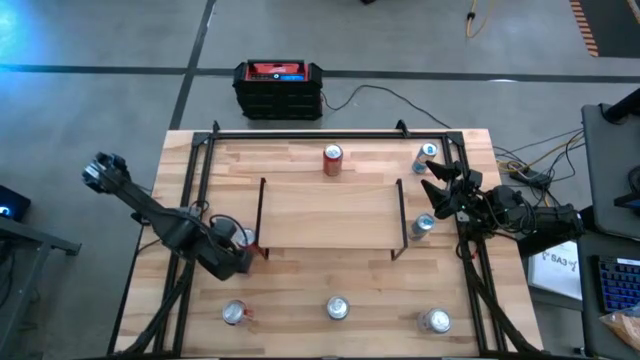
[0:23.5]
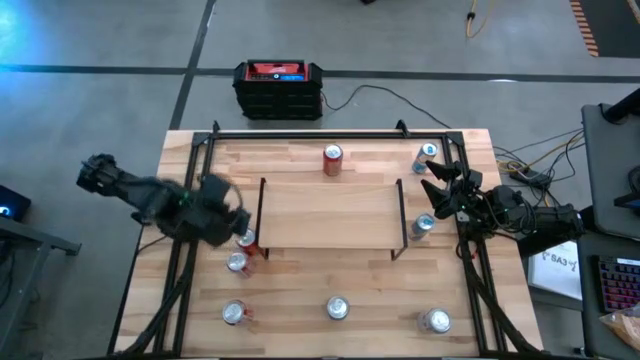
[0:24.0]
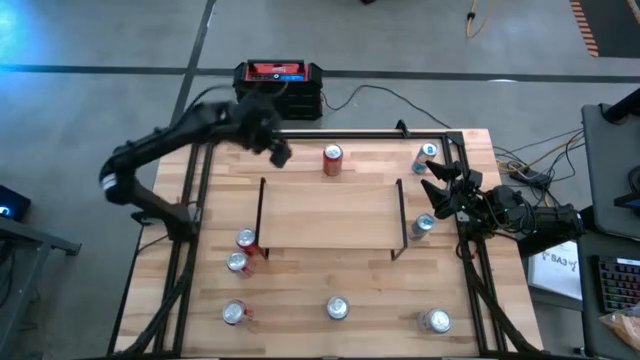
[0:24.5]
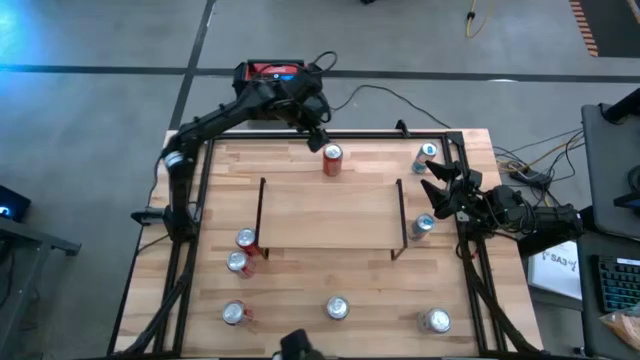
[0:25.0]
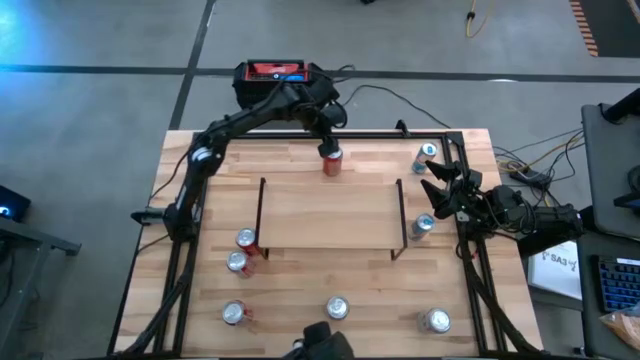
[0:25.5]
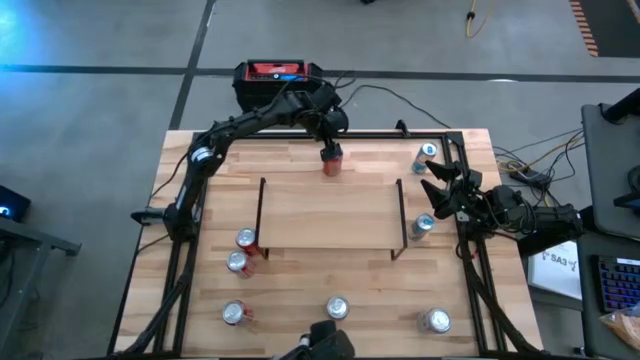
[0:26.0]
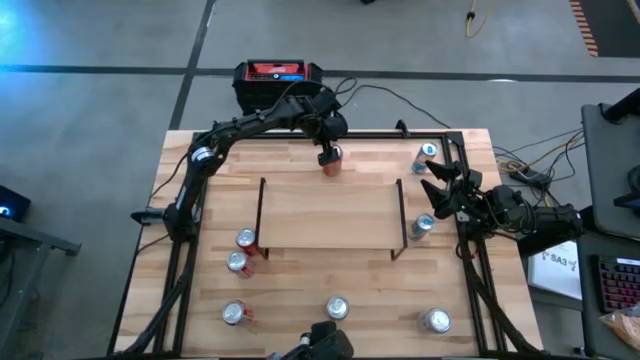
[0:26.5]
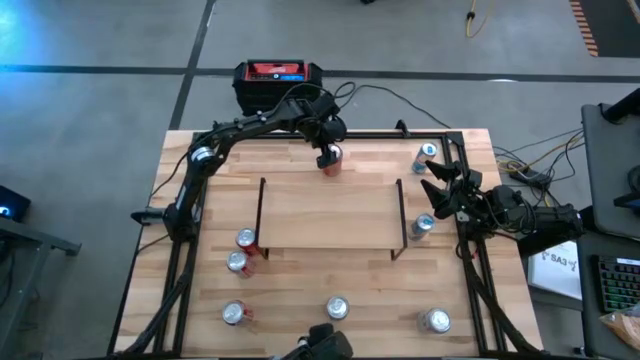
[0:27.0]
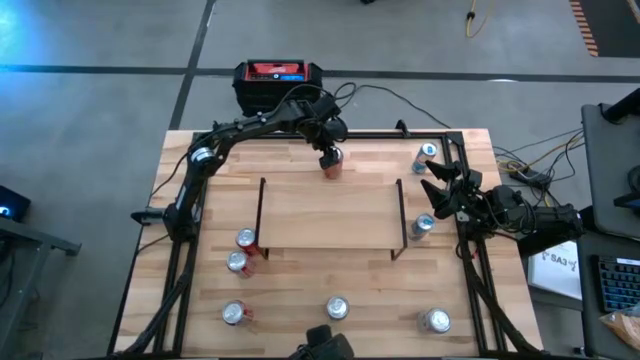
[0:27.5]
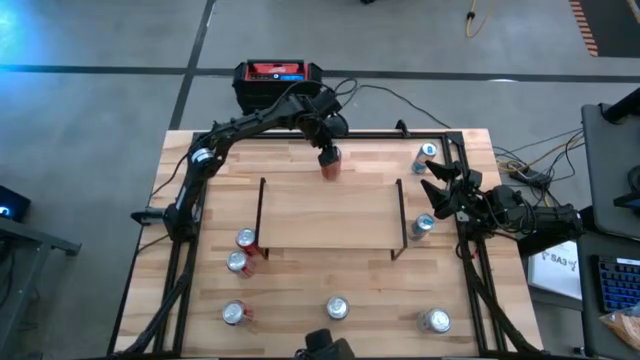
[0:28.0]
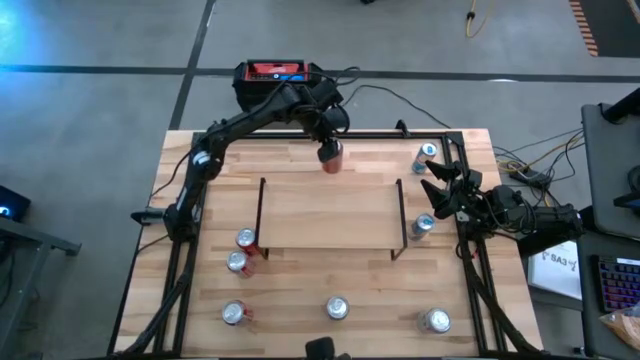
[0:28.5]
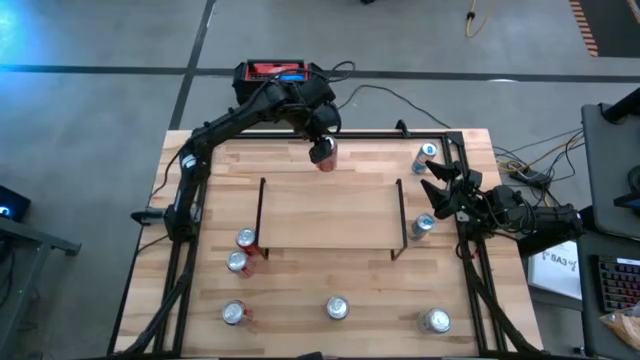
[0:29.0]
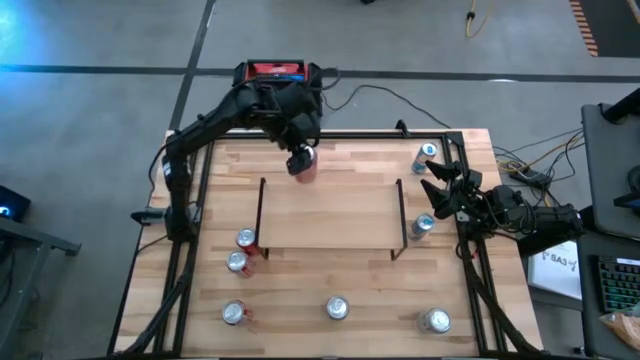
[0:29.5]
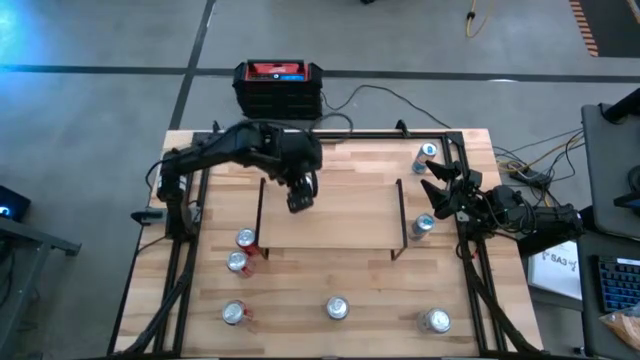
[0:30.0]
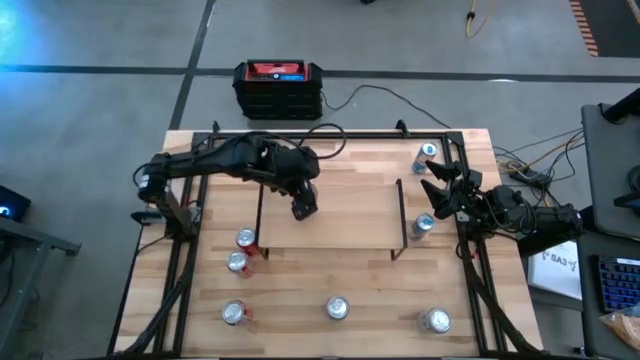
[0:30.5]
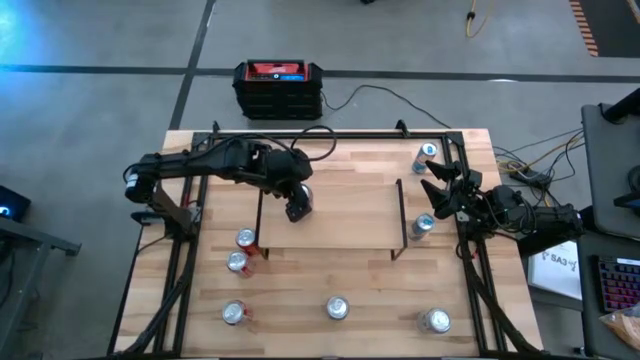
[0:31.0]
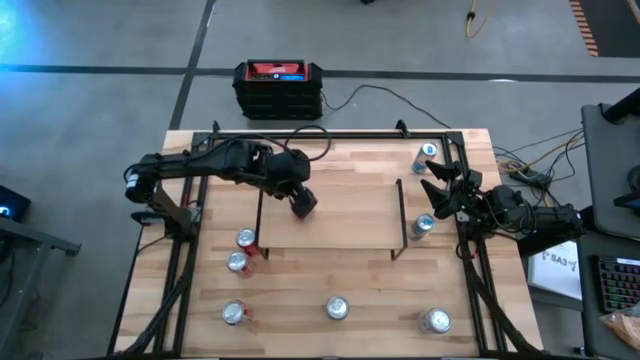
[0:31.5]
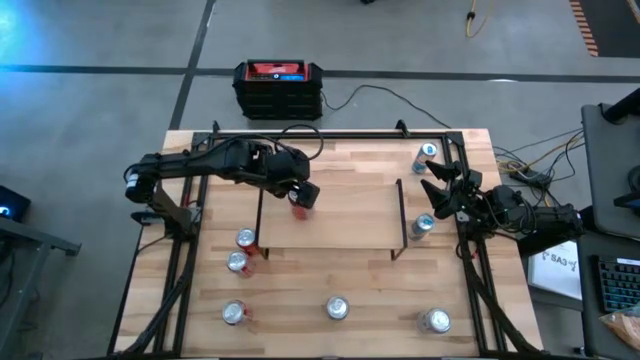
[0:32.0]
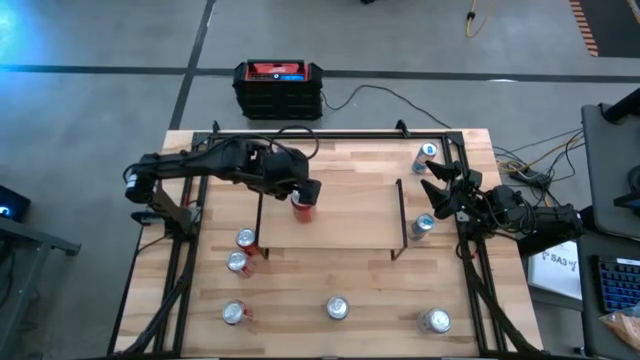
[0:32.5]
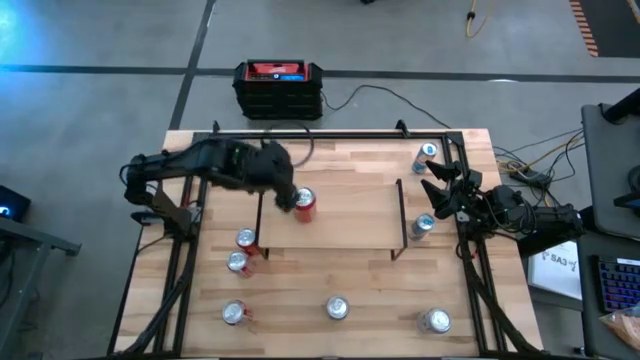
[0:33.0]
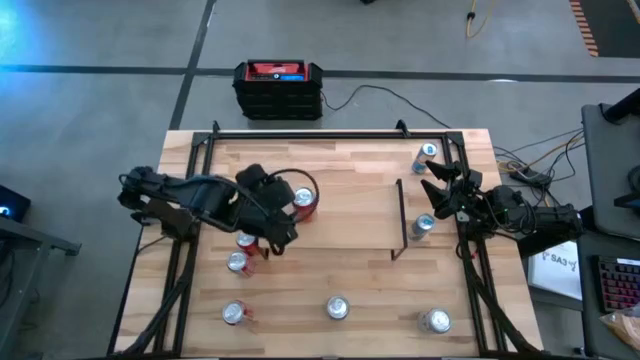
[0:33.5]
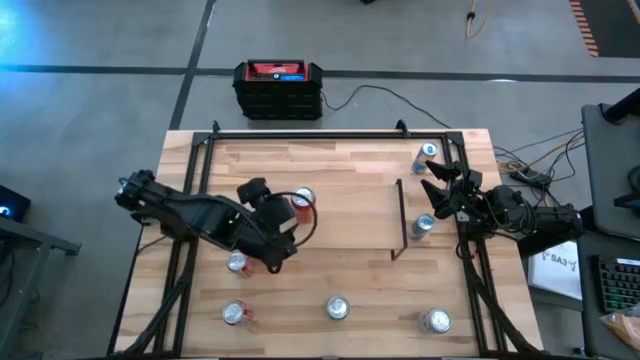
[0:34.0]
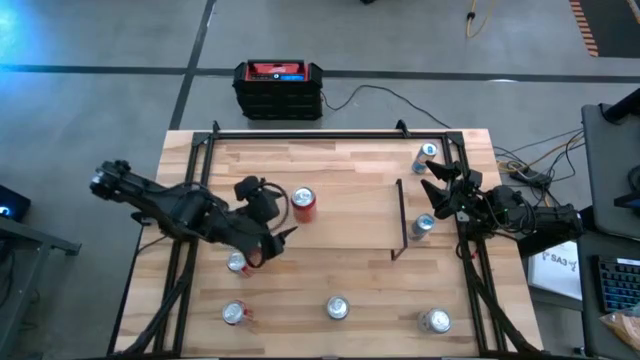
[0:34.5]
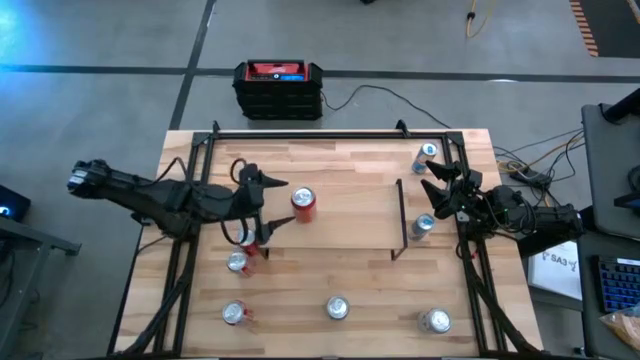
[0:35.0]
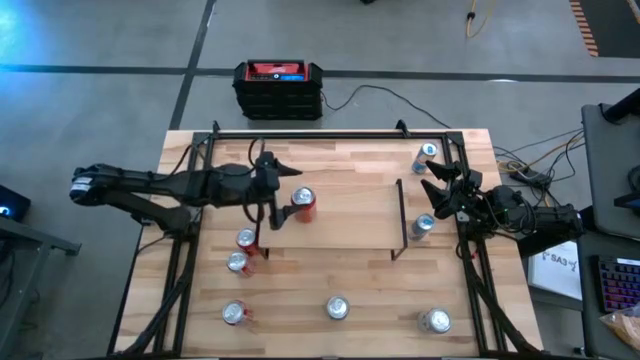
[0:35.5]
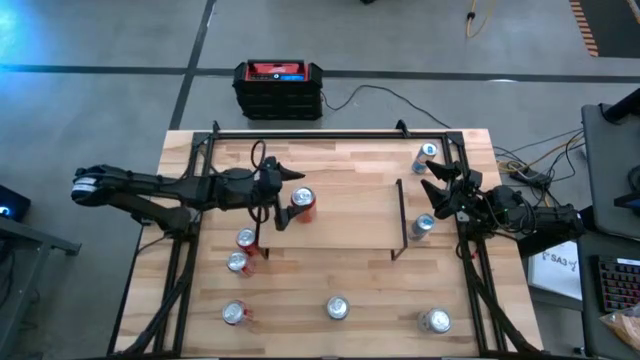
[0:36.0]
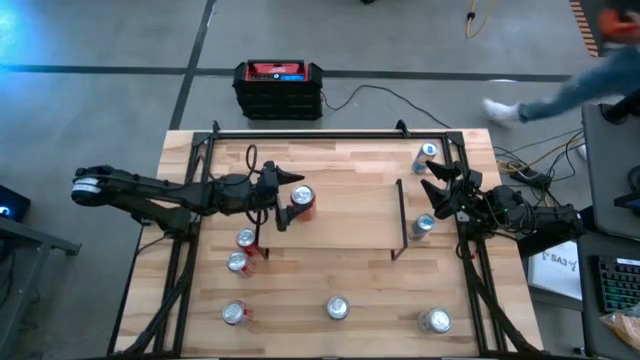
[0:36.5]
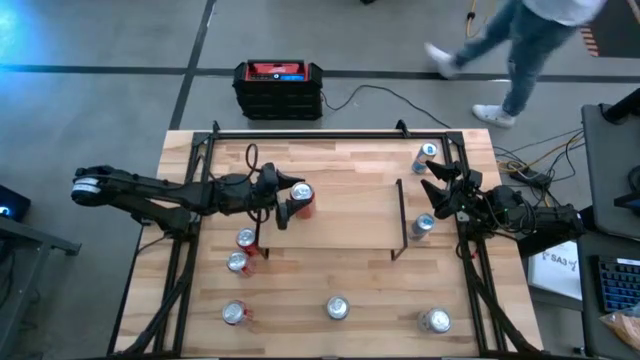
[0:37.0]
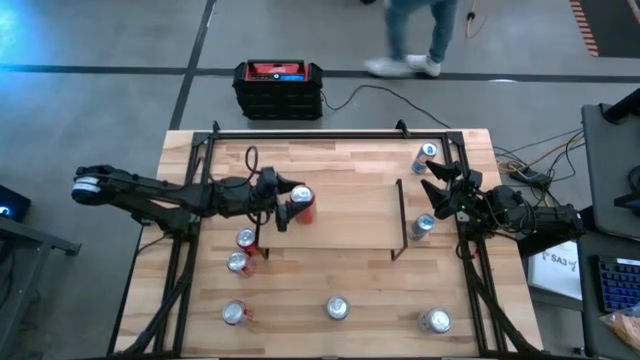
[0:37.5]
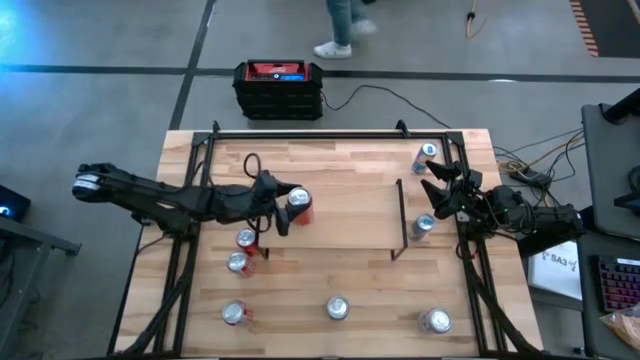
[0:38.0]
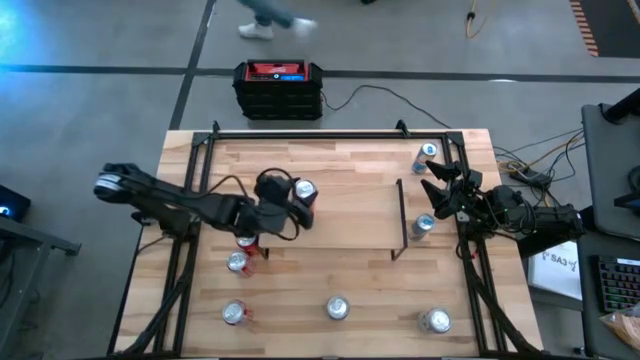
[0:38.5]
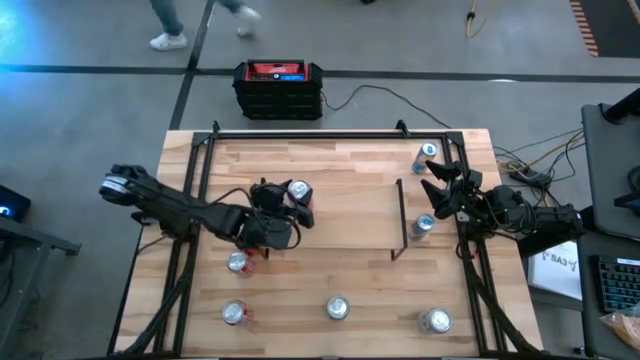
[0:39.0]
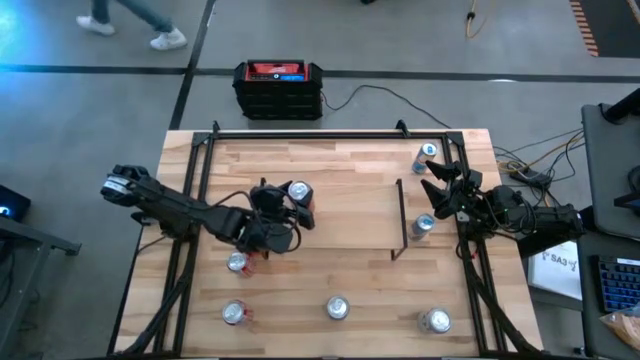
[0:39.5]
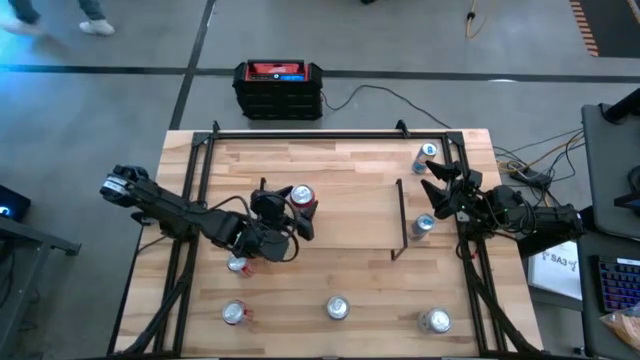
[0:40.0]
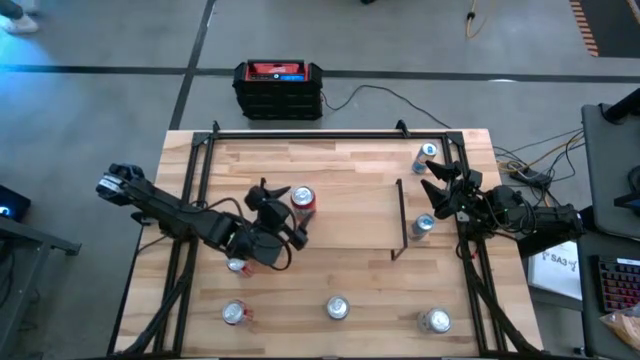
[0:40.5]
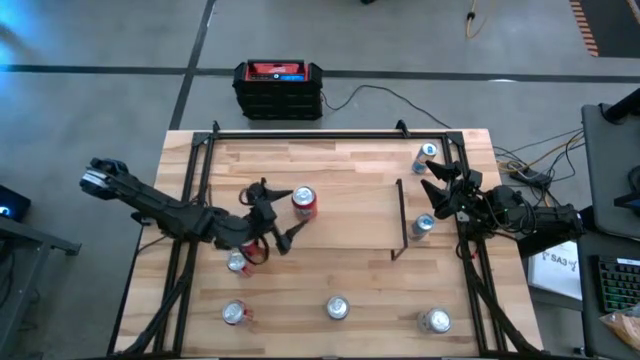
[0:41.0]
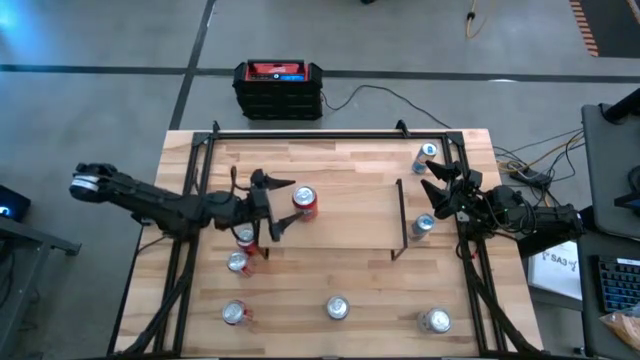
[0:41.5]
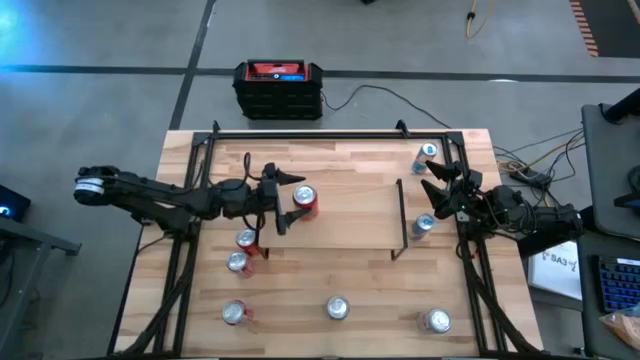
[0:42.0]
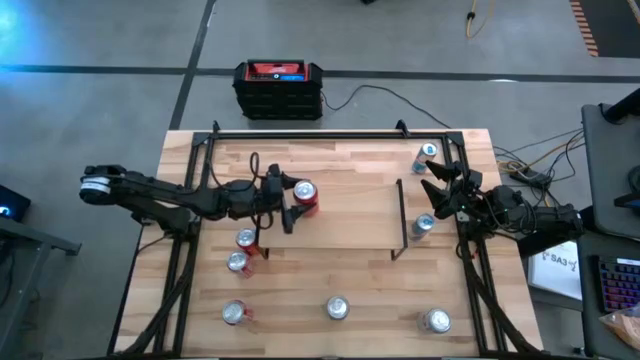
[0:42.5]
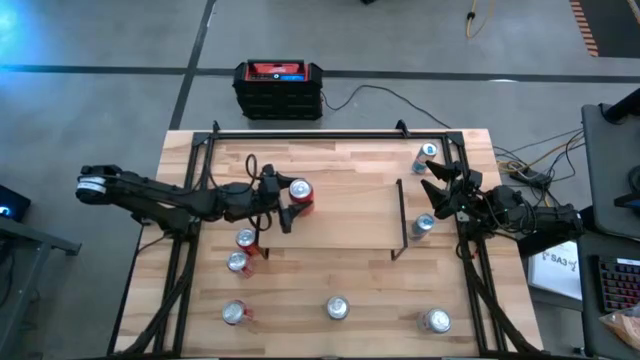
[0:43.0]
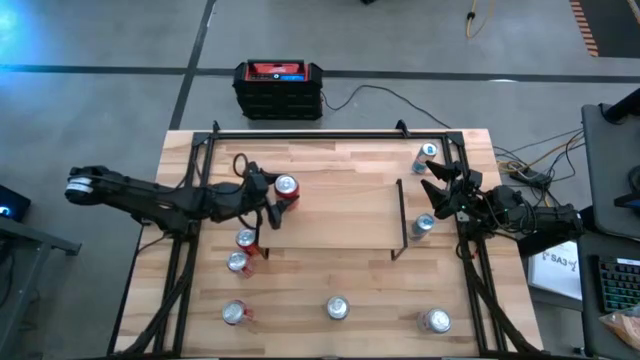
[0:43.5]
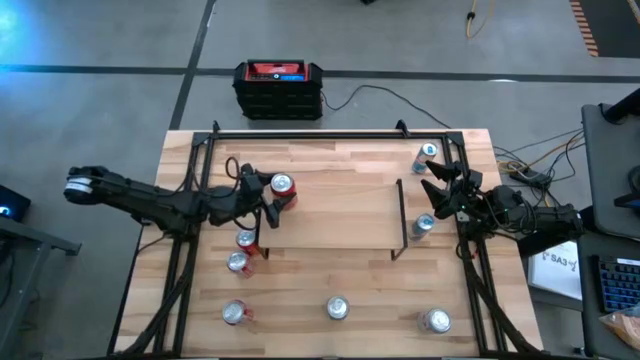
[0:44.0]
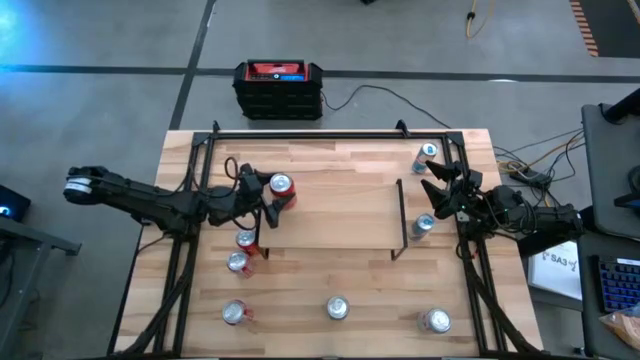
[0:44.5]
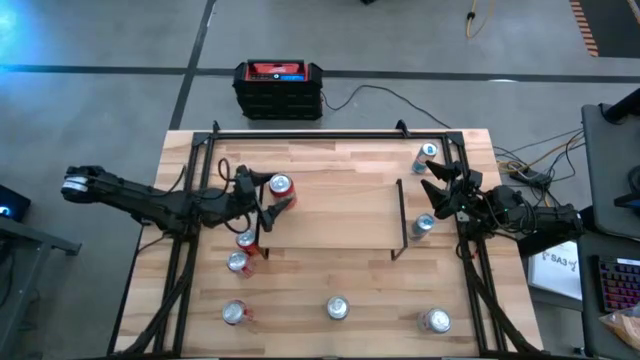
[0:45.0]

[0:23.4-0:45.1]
Task: Place canned beverage on shelf
Put the top red soda can on the shelf
